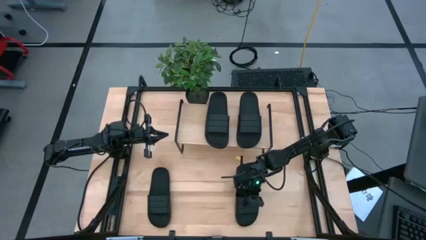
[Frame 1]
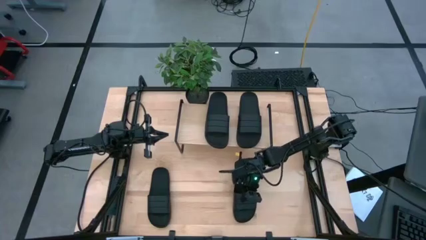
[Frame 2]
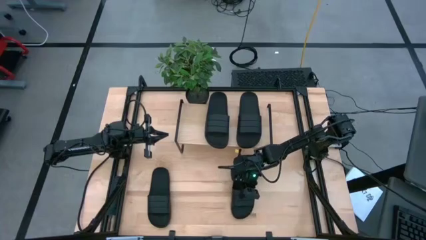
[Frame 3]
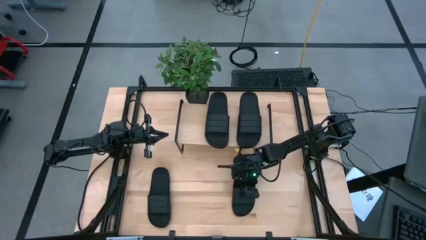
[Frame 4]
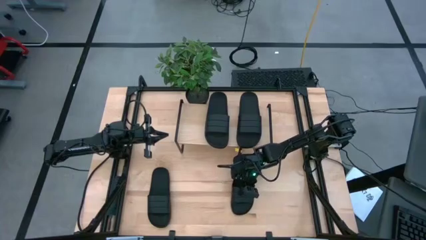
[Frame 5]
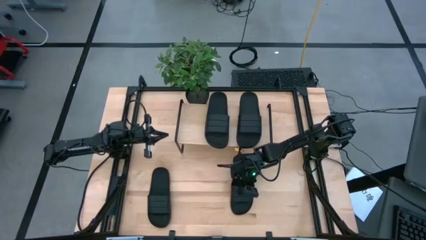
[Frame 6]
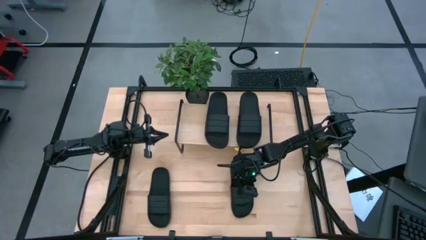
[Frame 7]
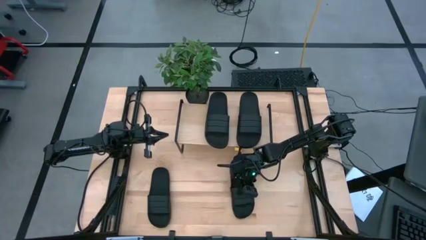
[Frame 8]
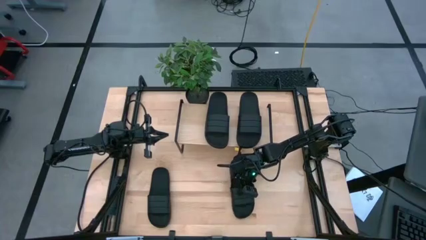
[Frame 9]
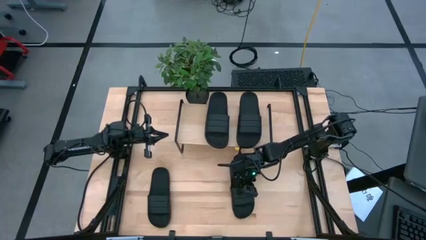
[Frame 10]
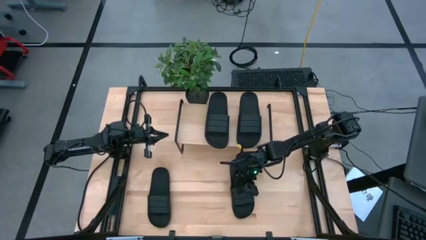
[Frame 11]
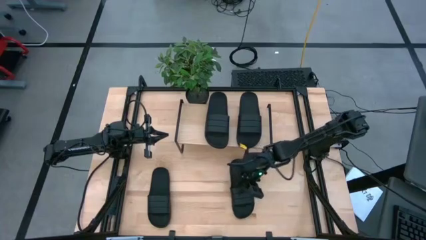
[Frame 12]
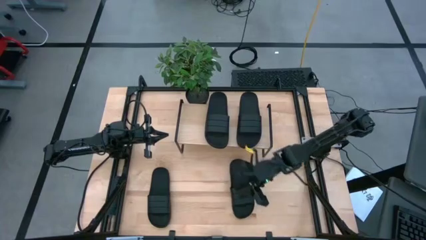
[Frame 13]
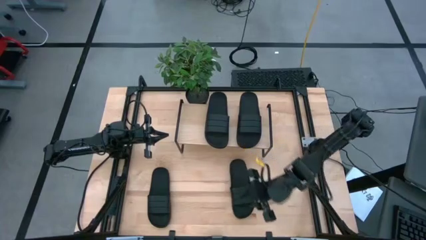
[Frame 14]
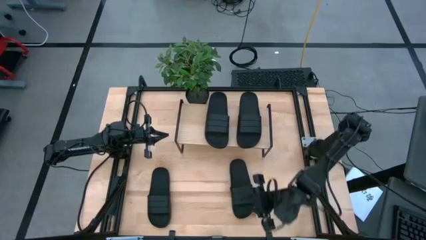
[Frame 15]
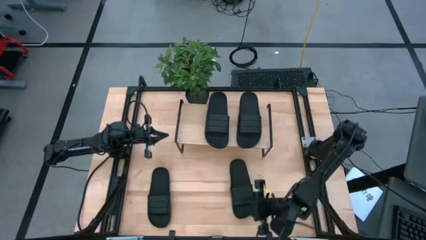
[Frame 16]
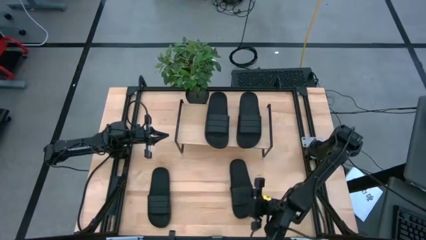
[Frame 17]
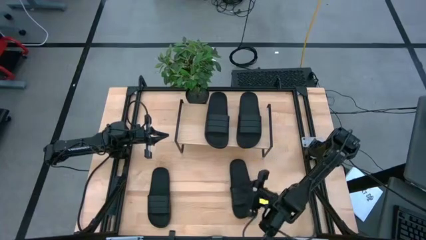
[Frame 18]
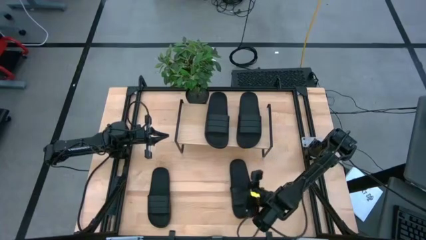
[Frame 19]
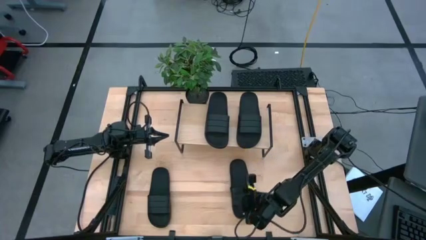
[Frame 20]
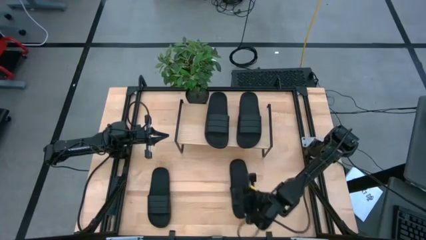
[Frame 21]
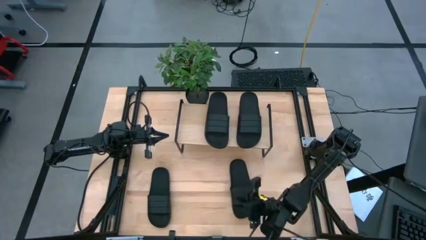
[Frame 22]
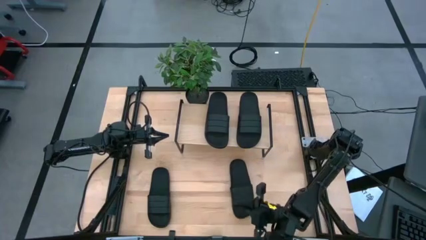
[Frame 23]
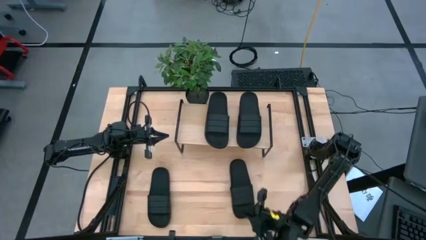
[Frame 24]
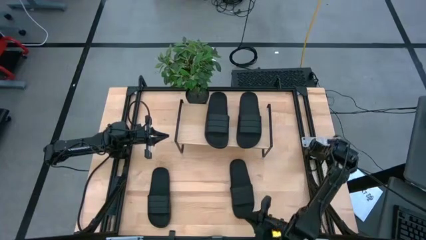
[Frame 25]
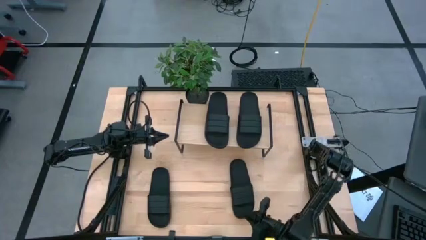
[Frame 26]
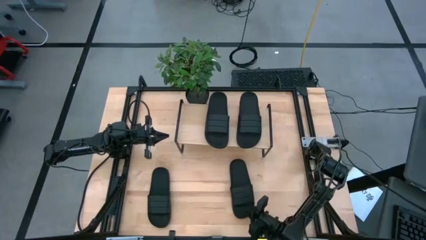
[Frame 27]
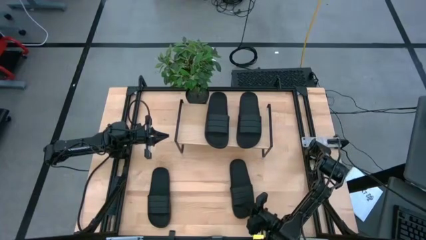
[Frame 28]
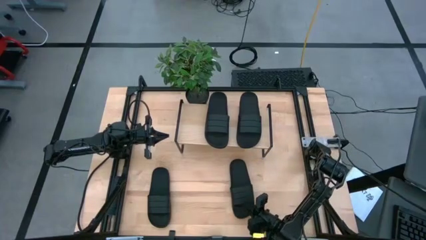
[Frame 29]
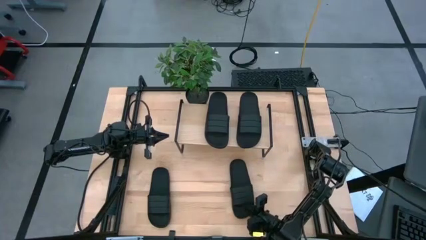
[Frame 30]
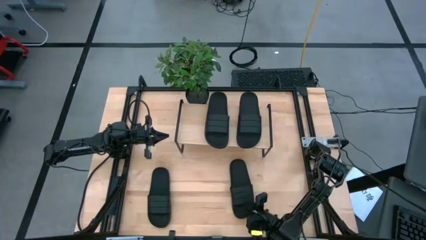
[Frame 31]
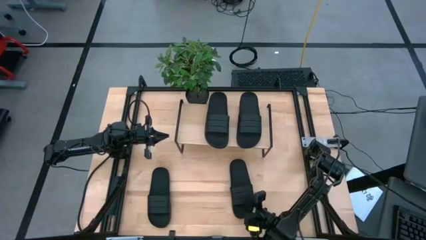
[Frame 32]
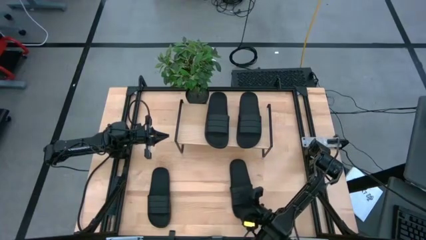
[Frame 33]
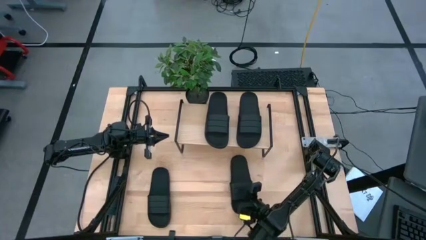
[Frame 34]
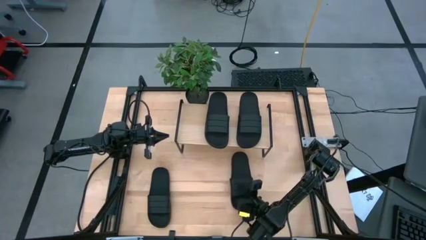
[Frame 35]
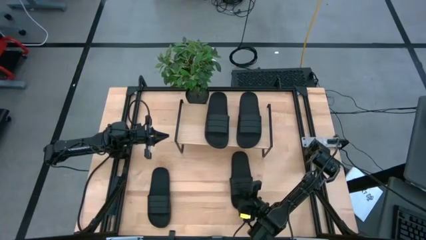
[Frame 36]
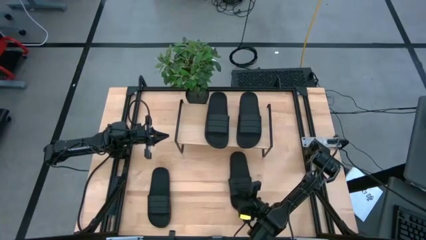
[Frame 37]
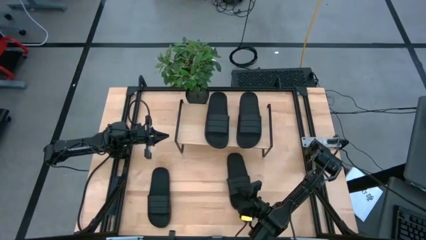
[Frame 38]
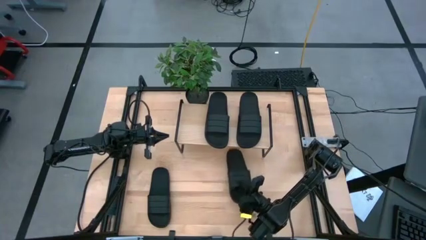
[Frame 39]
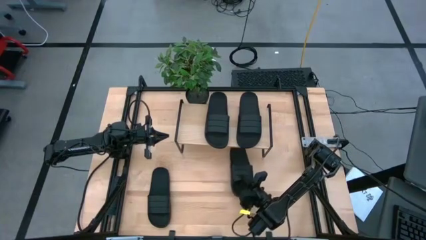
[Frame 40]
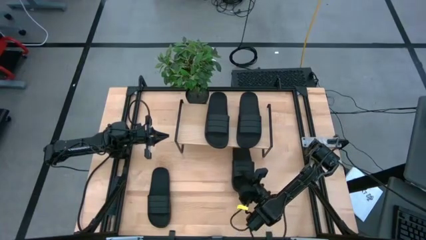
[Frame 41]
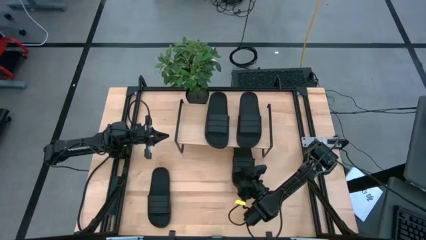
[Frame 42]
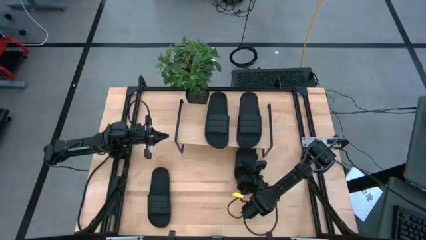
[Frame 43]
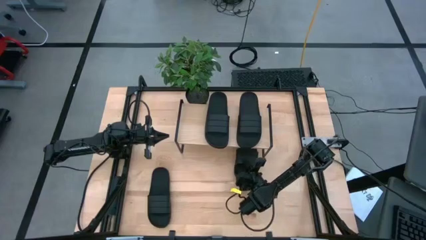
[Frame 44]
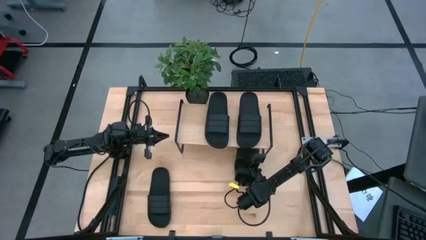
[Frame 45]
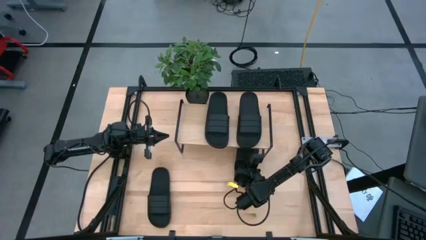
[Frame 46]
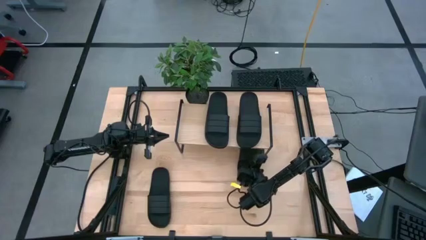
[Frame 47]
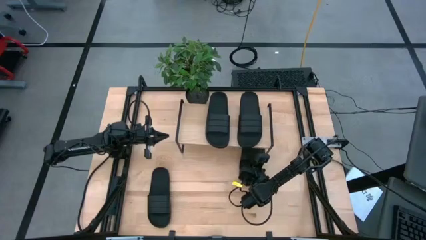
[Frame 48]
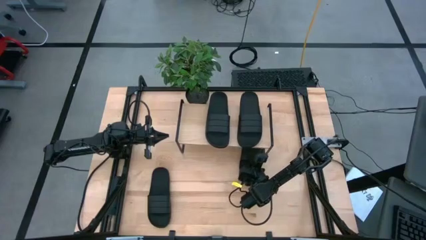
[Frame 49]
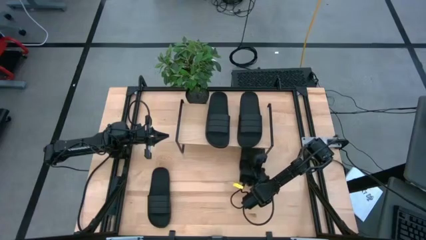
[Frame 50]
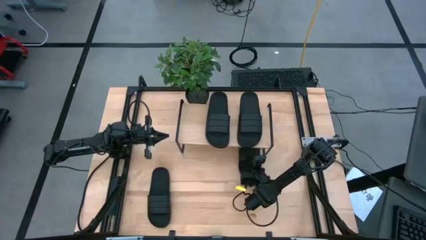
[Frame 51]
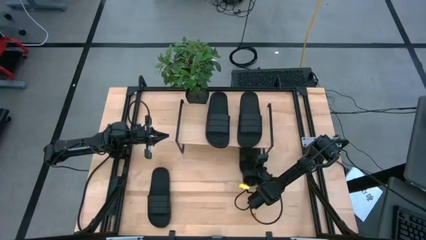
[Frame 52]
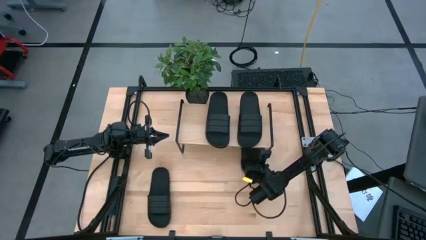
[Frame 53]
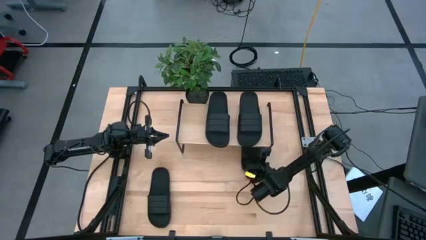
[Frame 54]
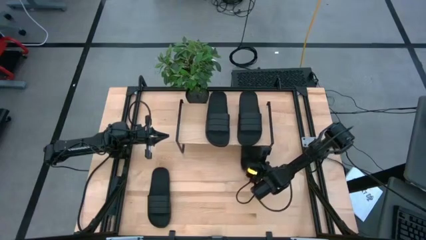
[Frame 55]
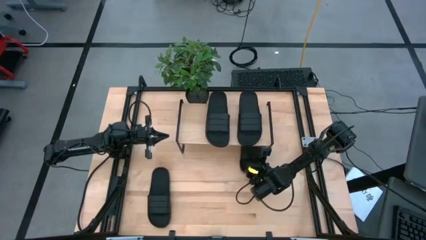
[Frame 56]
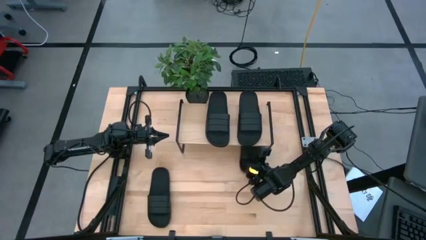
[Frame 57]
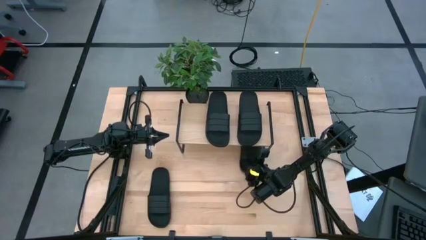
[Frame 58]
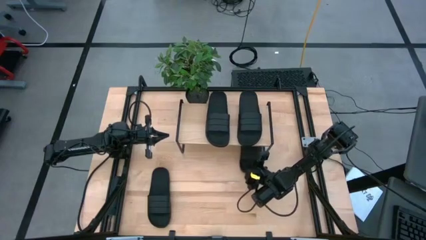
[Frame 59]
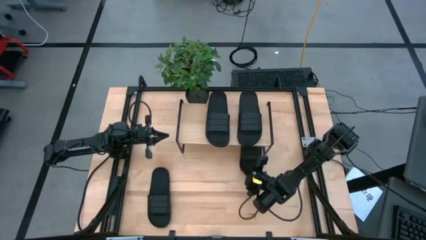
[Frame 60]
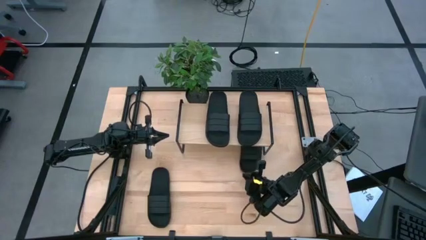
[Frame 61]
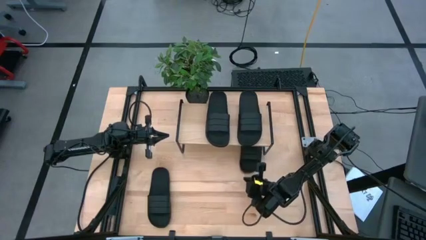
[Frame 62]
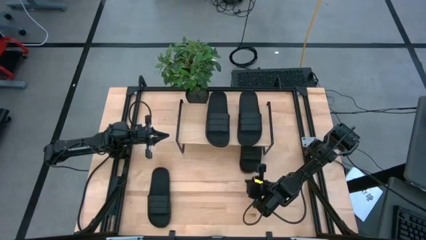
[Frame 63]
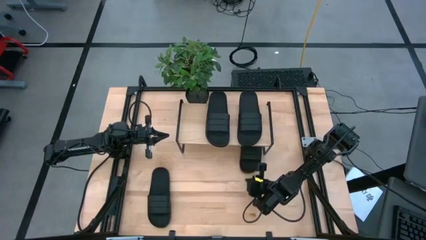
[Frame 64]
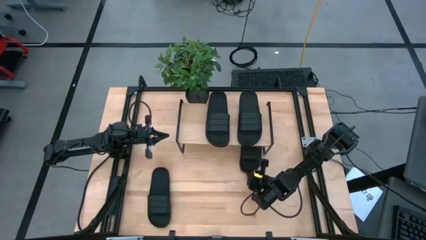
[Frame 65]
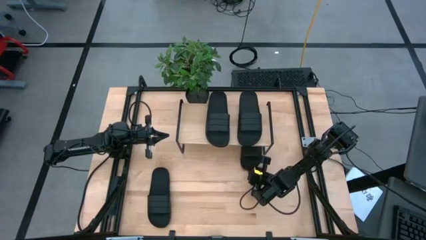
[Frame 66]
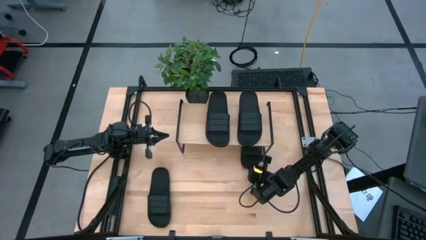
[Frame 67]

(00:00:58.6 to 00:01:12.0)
Task: Pick and place slides into the shelf
Put the right black slide under the shelf
